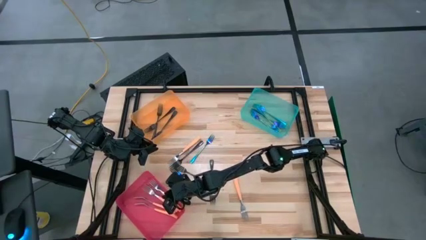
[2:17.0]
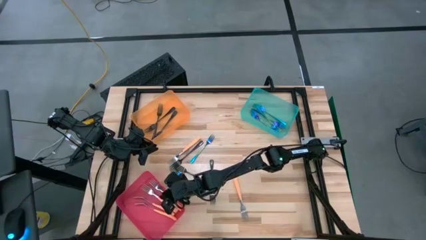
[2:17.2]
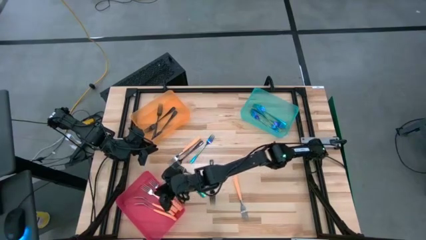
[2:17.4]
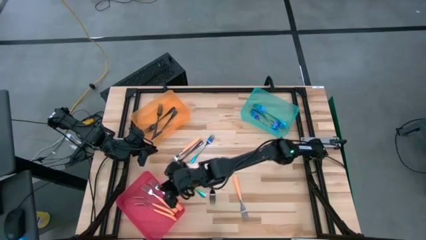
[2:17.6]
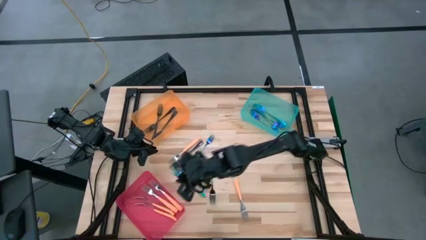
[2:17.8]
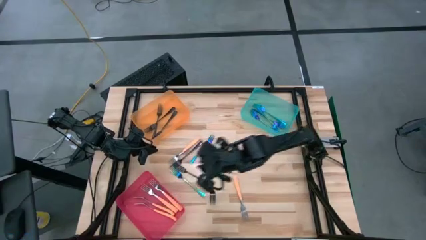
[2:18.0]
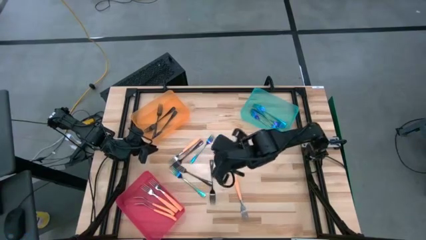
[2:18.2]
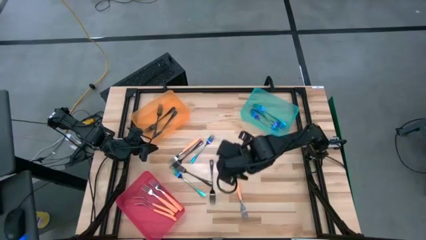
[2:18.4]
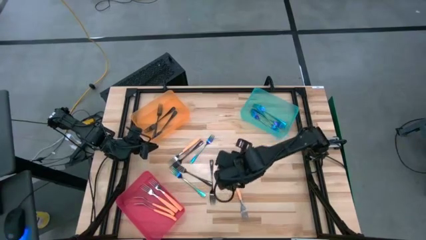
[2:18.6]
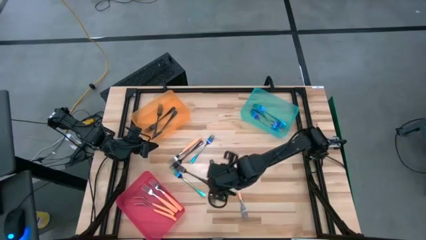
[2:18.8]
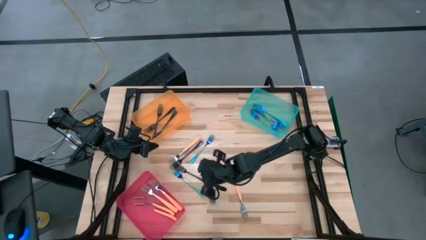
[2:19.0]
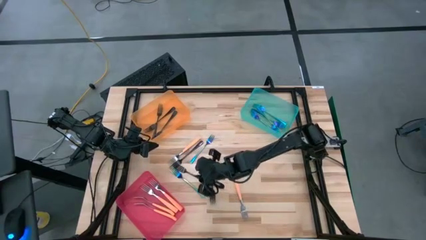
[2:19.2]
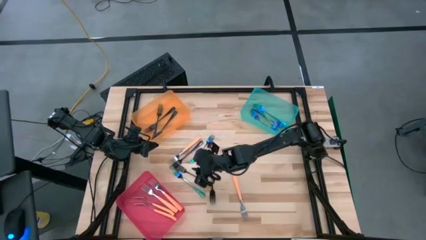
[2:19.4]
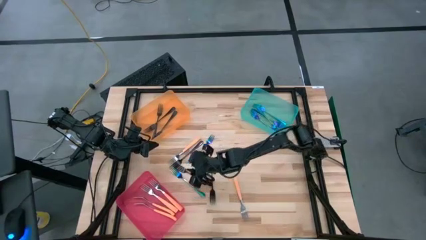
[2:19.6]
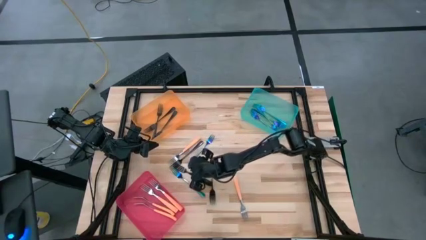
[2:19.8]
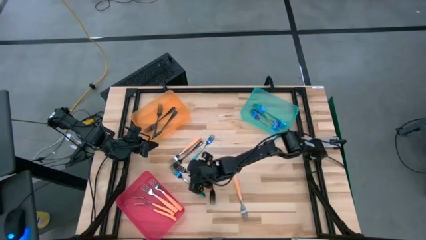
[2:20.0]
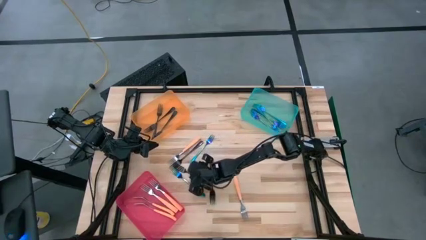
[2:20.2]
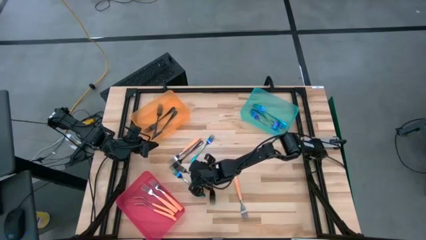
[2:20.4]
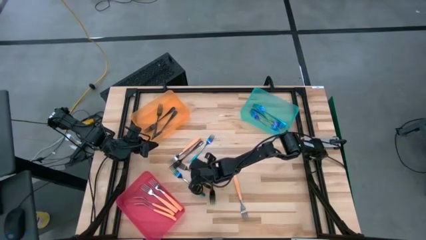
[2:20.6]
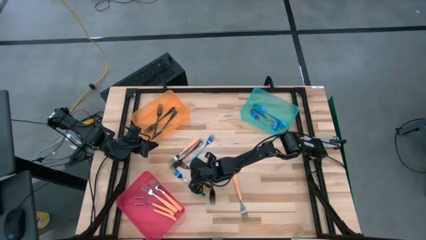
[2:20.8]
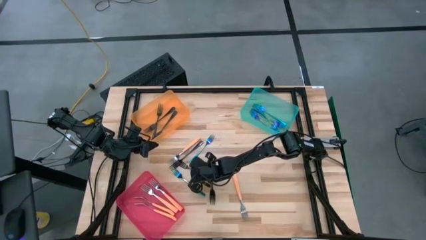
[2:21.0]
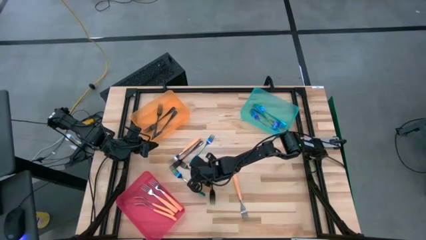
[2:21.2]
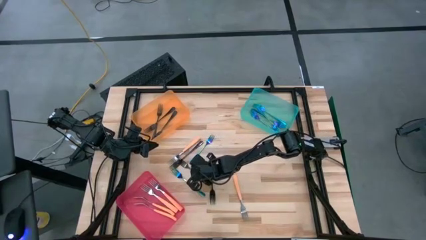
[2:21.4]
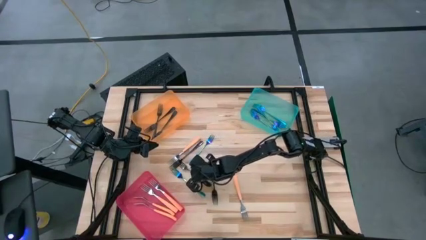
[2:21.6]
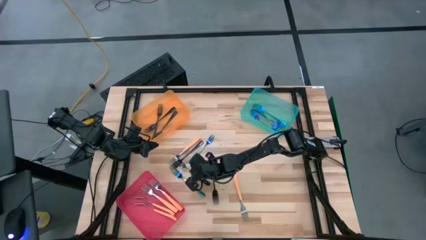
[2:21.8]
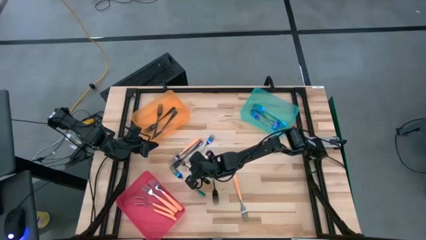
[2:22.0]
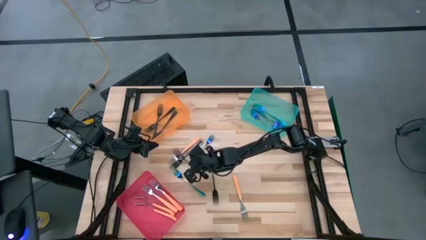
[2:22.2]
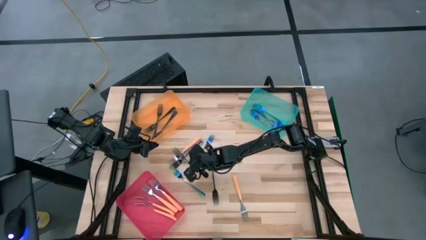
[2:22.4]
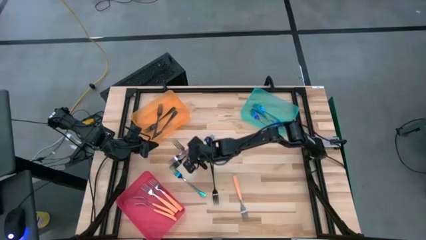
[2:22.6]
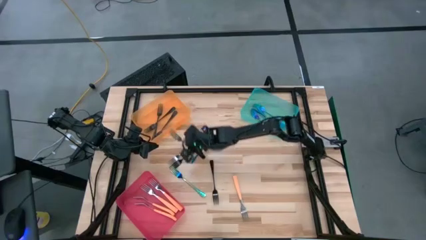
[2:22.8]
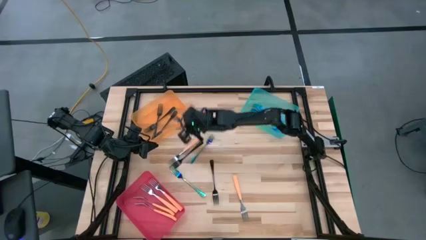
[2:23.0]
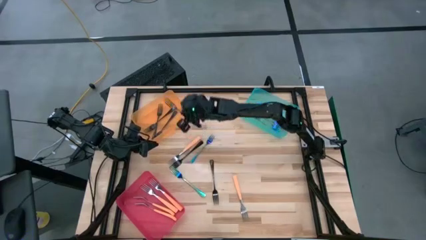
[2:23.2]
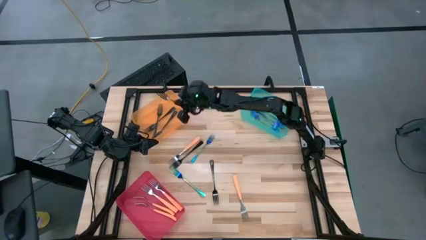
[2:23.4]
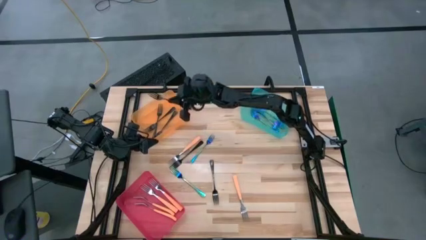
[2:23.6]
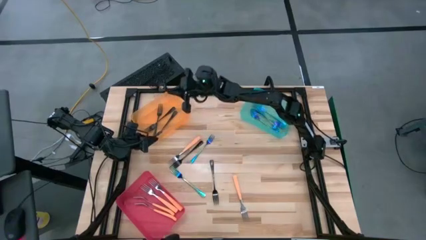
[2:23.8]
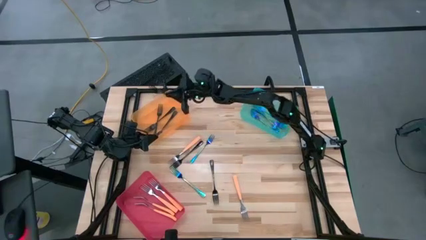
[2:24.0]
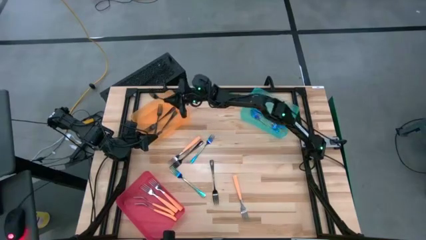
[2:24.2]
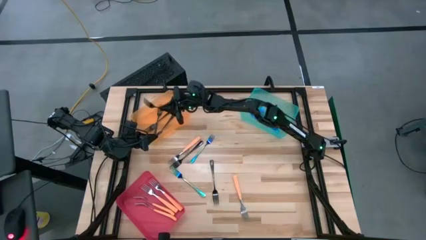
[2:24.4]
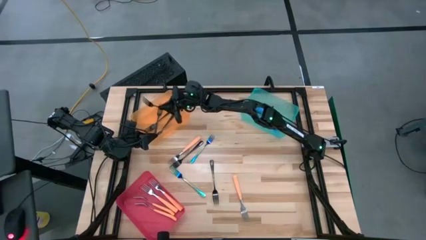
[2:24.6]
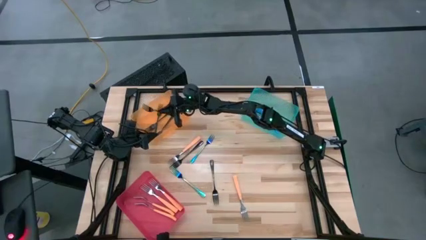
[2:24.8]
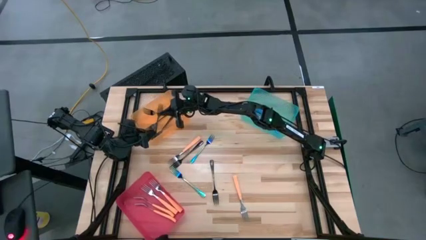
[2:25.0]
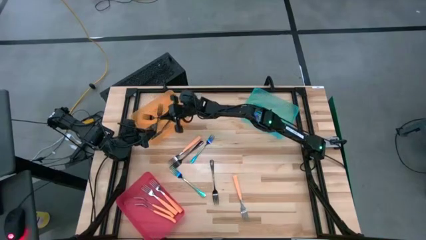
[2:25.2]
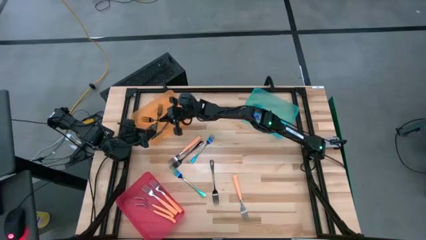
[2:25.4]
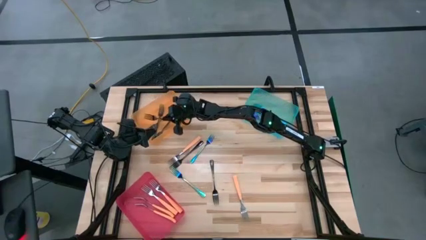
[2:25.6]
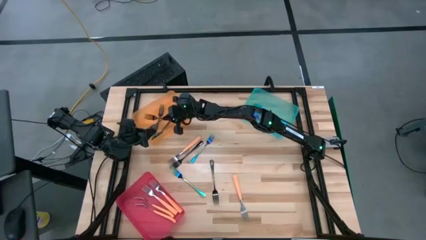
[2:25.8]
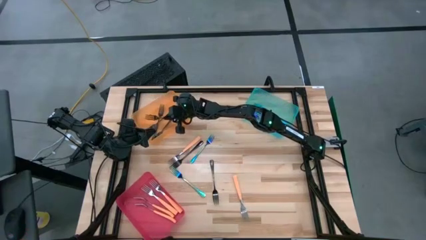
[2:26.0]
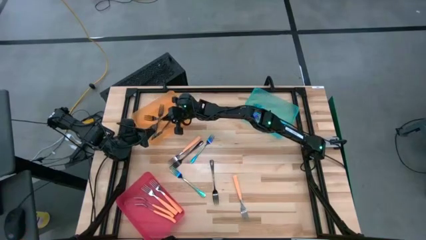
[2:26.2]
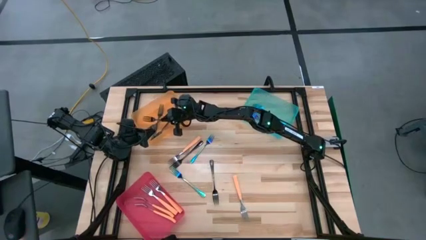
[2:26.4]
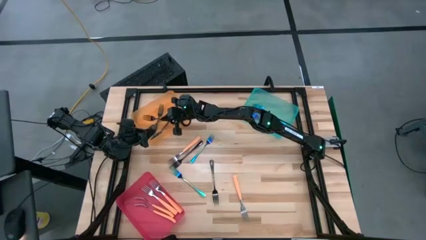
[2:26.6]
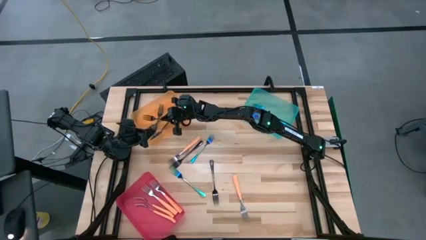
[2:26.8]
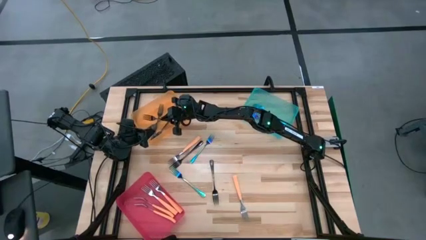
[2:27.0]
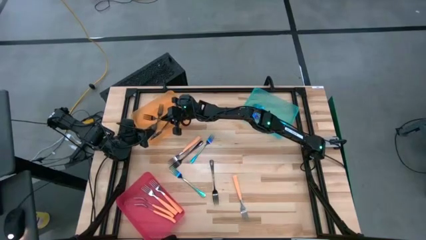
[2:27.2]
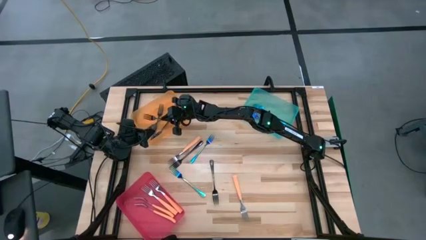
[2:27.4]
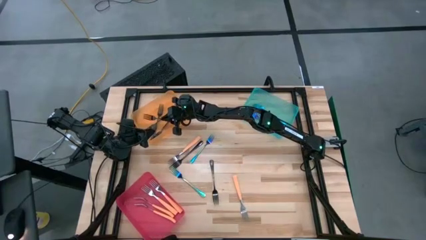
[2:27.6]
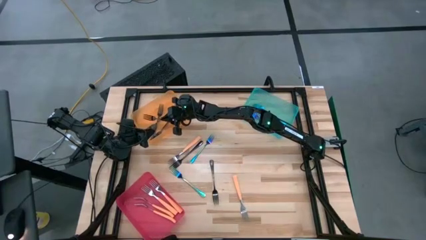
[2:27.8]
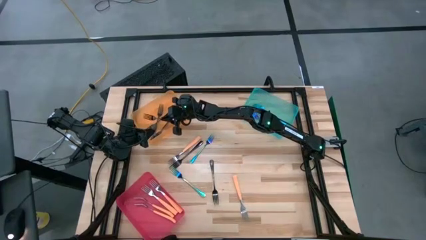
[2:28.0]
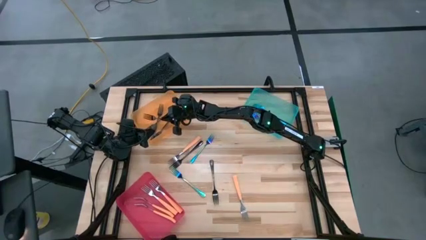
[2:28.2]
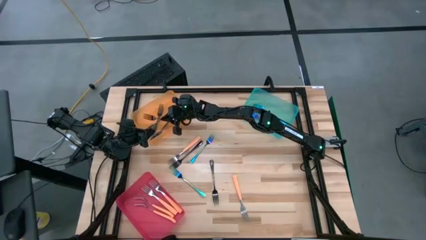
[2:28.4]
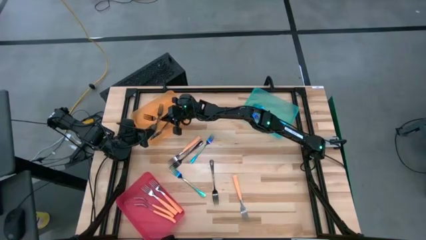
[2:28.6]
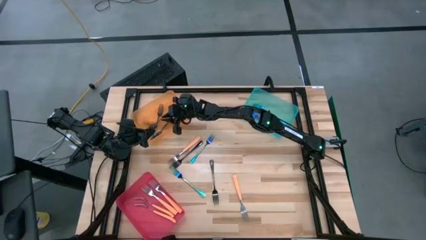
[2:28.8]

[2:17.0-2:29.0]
Task: Sort silverware by color (type)
Put the black fork into the orange bin

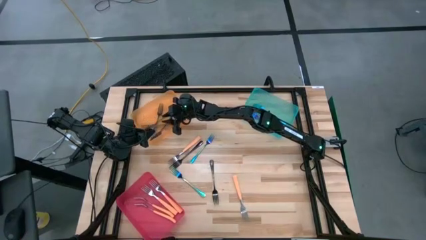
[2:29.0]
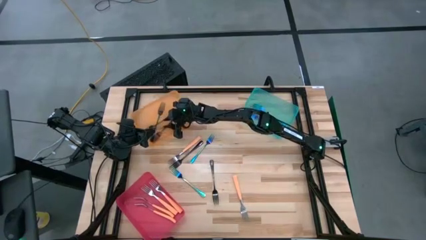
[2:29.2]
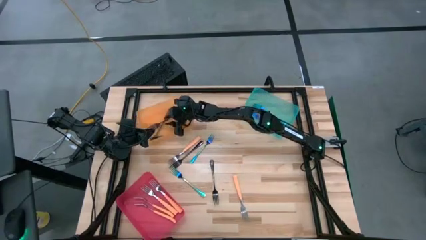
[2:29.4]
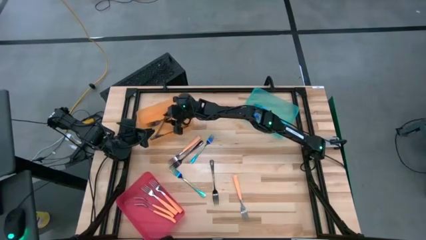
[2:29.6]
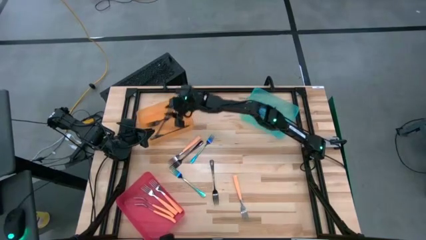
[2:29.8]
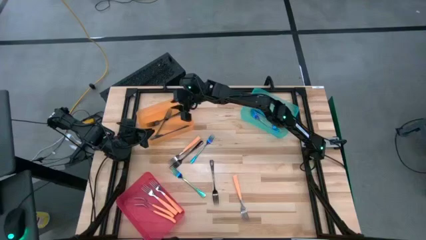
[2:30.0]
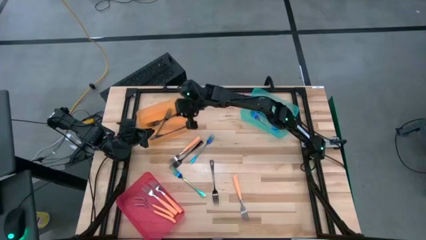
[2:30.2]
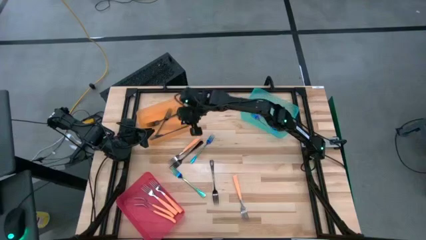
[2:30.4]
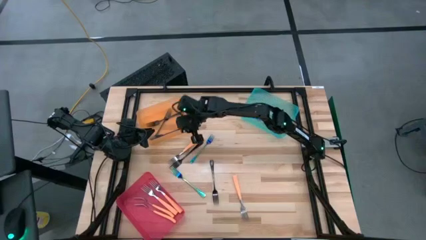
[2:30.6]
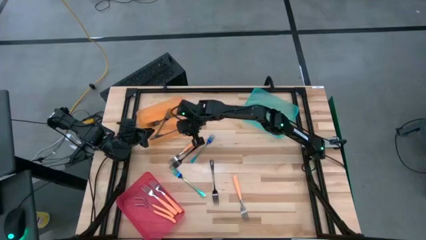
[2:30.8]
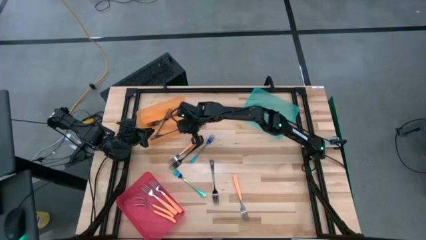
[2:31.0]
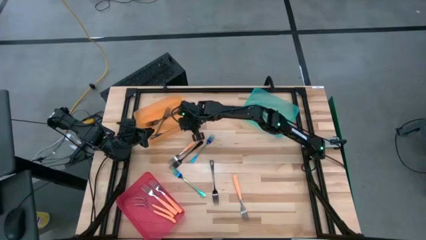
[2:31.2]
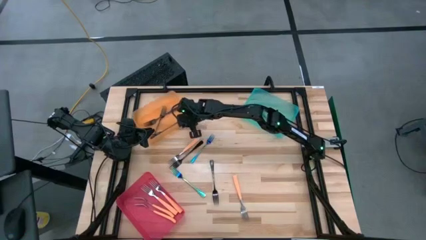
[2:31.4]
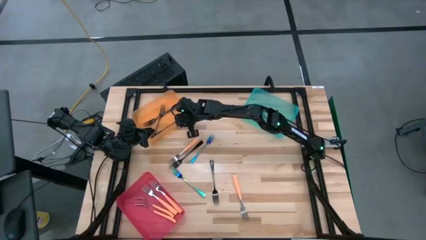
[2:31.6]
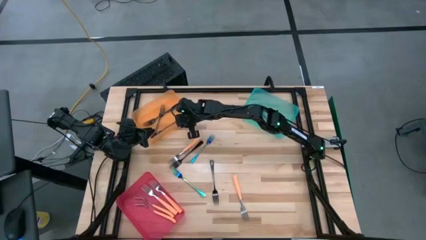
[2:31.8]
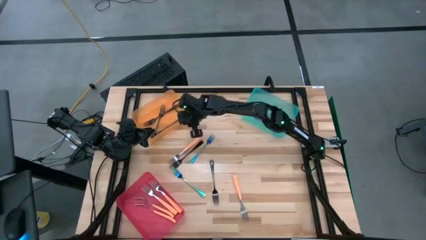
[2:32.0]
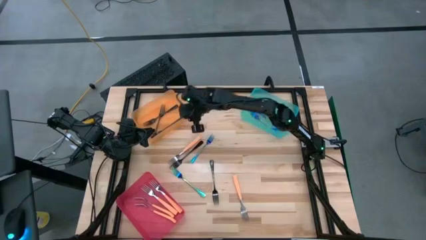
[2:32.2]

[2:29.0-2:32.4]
Adjust the orange bin
